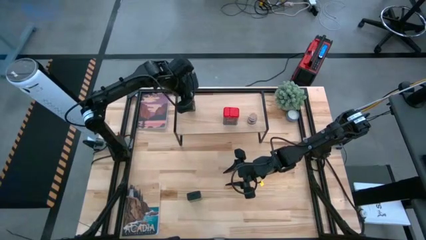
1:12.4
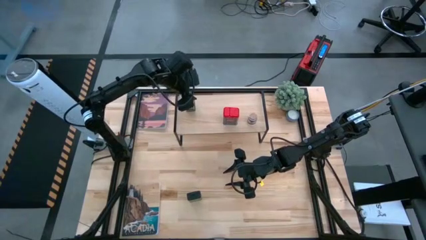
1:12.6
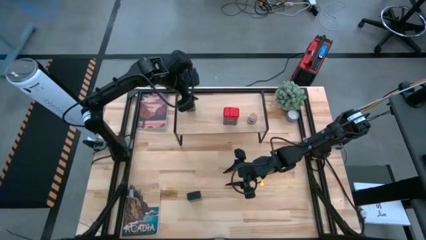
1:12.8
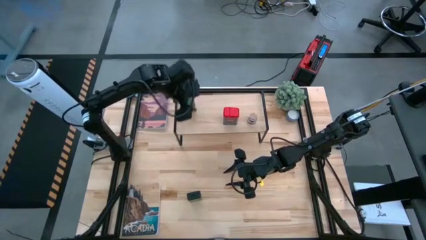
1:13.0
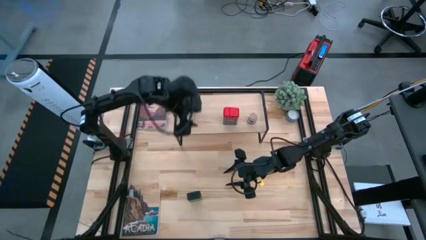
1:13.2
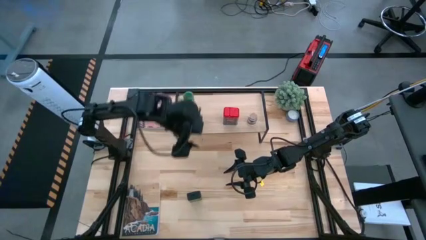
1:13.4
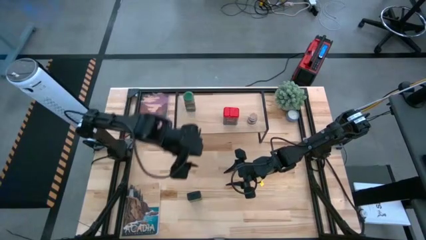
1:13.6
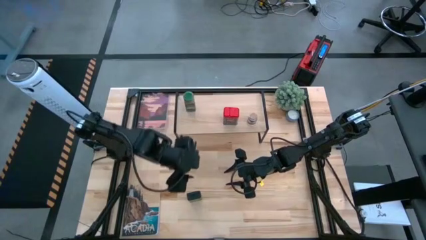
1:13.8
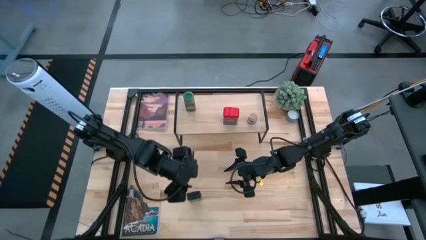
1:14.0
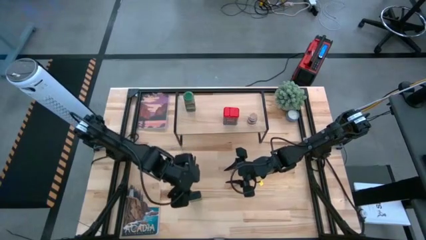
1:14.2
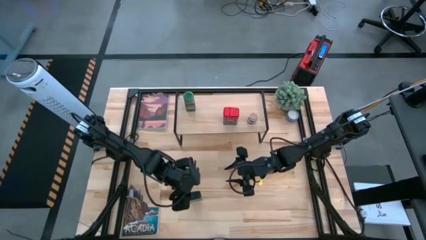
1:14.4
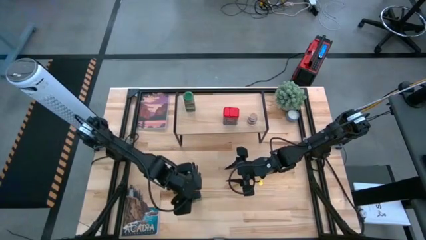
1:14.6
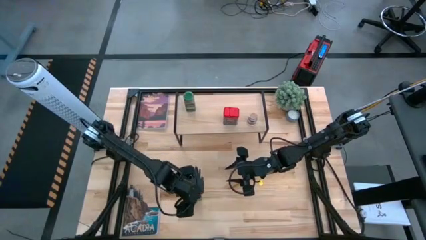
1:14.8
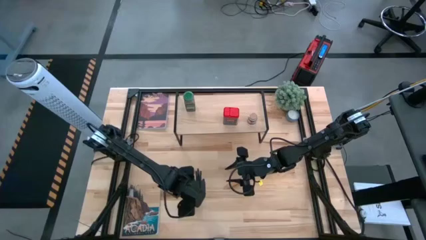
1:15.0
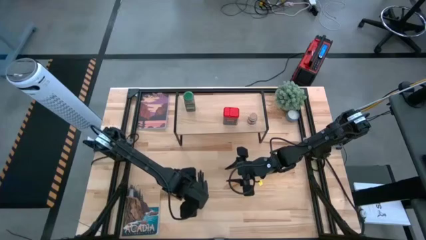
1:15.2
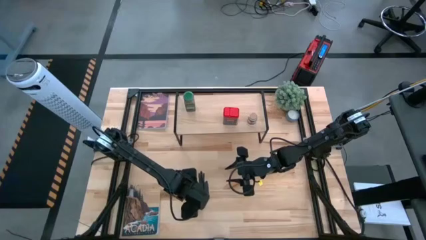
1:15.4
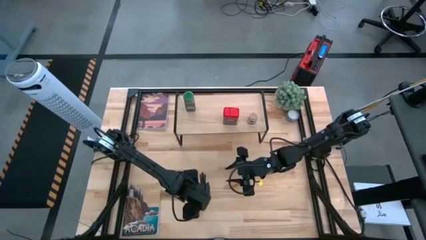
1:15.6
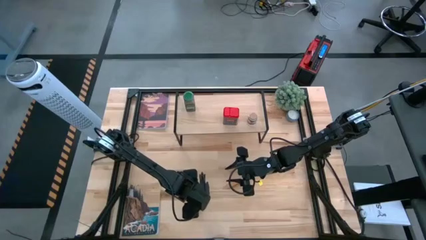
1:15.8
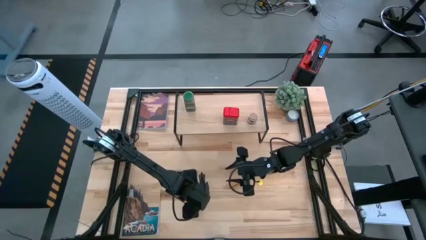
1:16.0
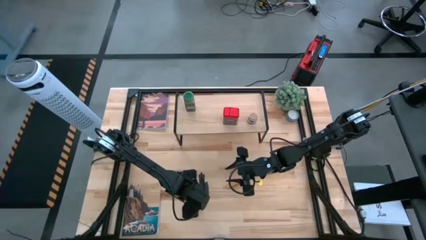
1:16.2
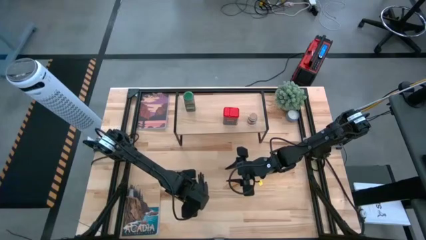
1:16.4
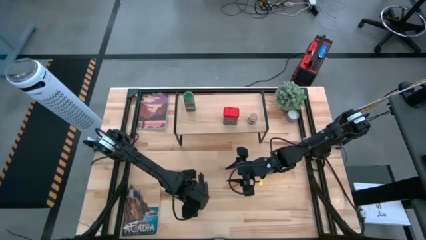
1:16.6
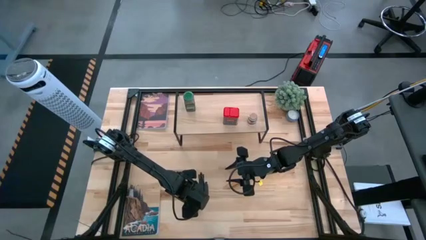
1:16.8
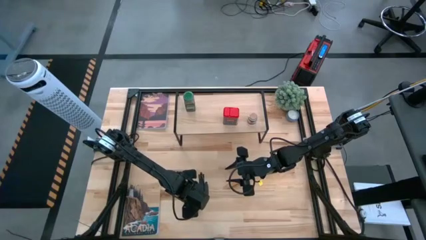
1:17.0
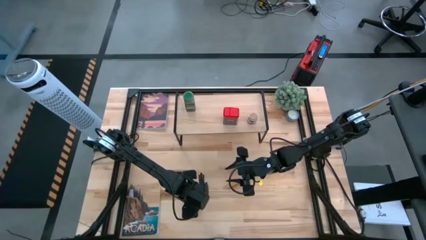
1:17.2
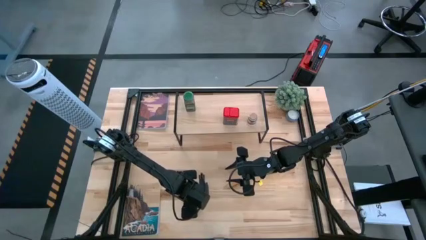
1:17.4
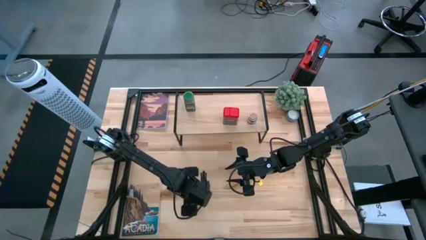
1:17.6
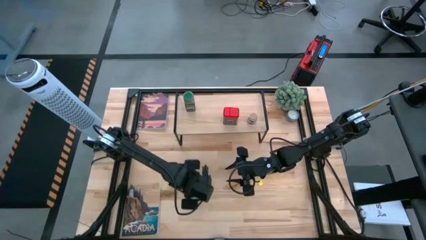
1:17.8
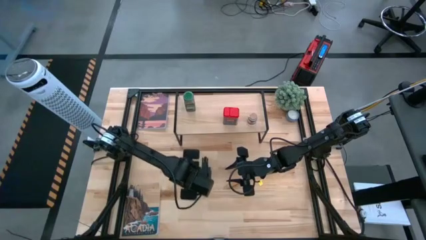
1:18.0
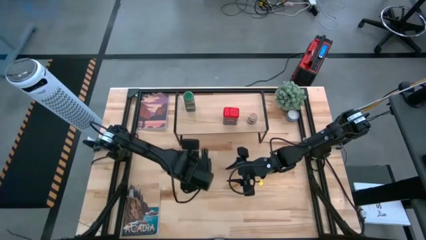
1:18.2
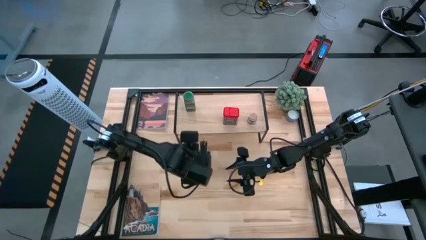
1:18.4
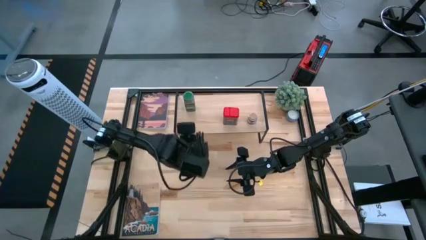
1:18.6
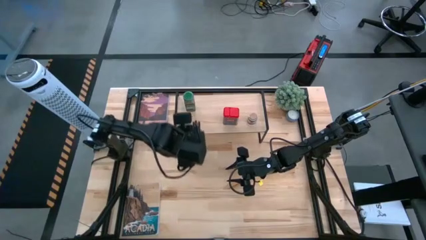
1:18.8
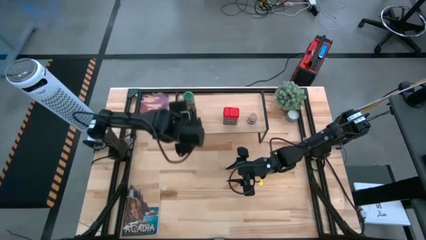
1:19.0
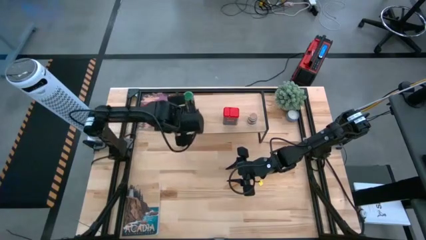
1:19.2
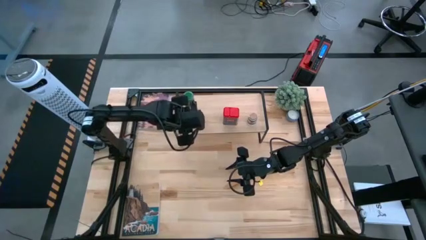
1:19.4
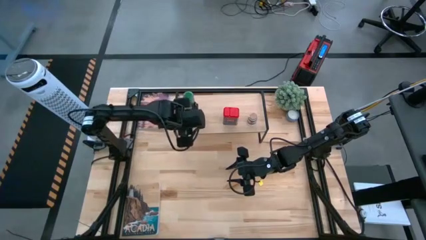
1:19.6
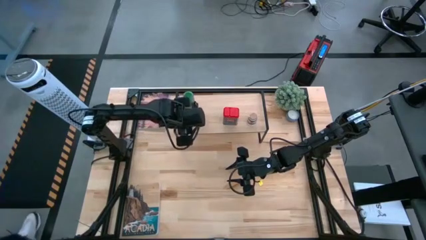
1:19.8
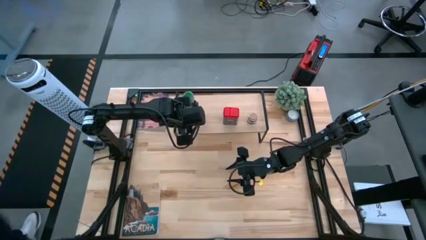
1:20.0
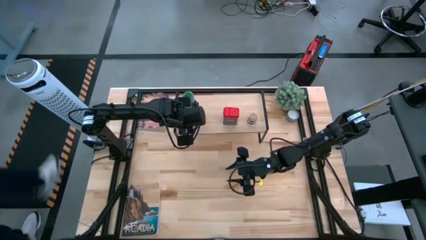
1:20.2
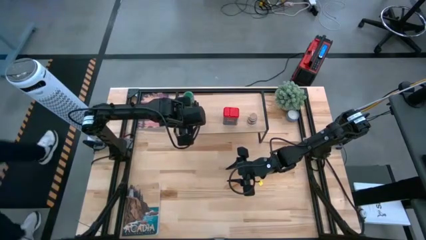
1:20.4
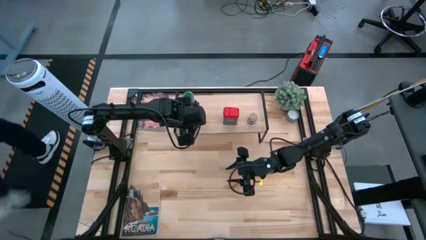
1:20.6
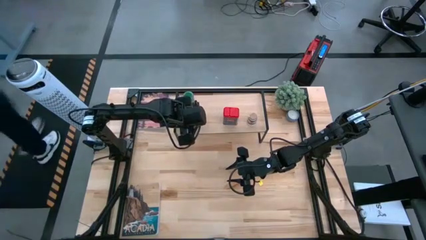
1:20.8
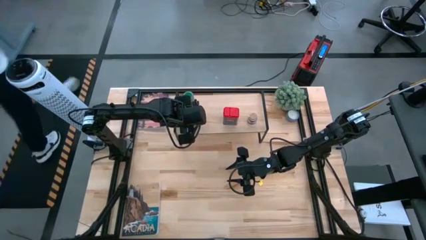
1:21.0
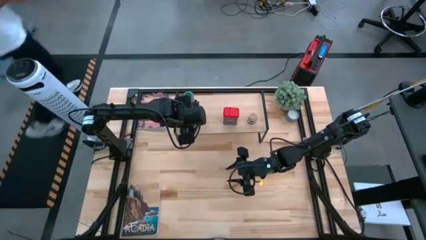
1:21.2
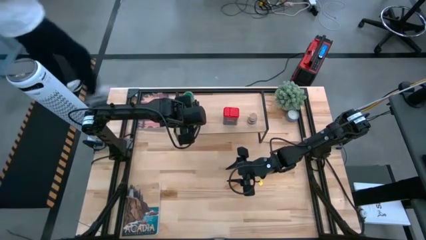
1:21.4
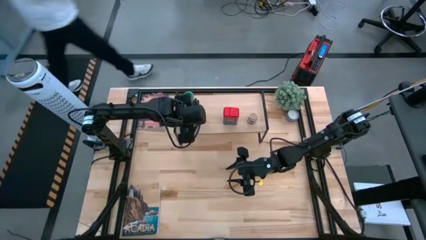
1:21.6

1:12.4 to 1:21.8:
Task: Shelf spices
Put the green seasoning can on the shelf

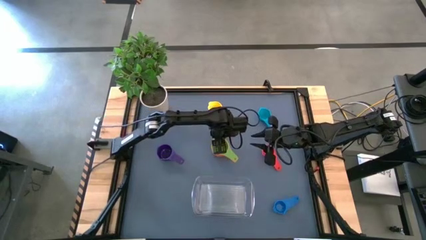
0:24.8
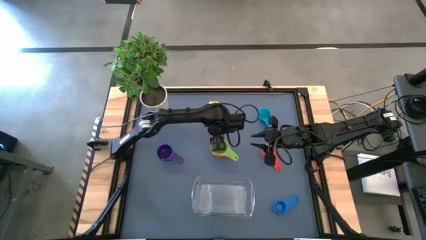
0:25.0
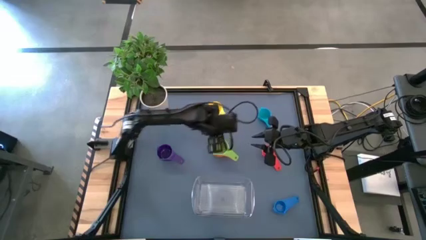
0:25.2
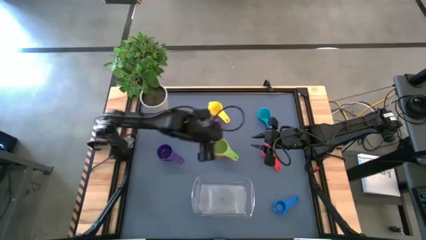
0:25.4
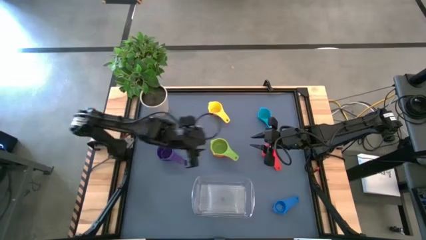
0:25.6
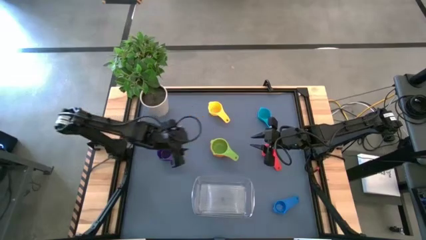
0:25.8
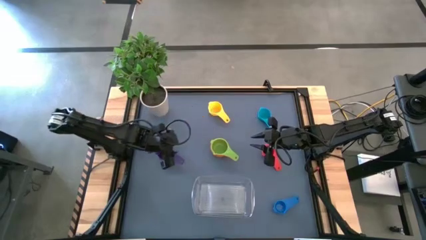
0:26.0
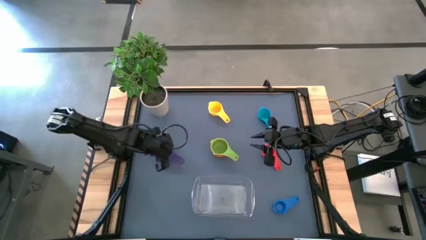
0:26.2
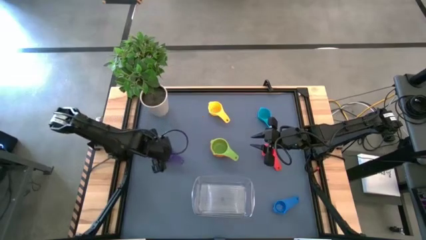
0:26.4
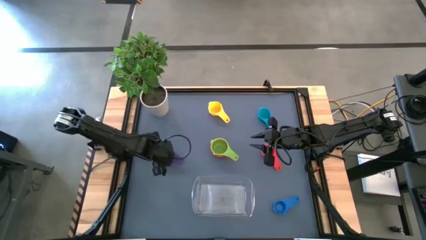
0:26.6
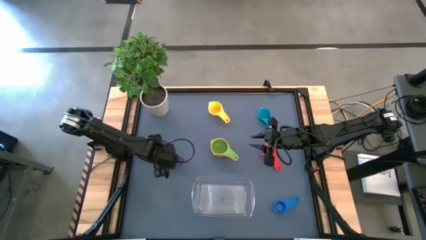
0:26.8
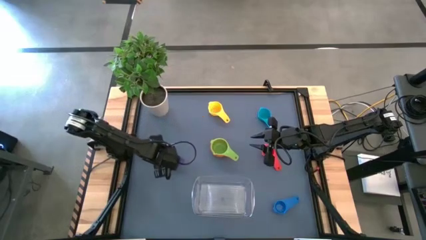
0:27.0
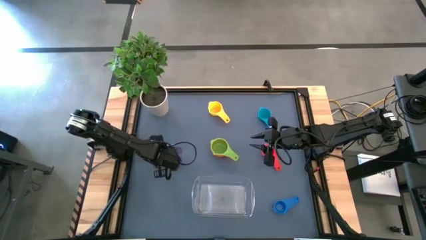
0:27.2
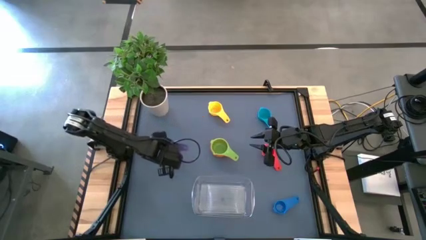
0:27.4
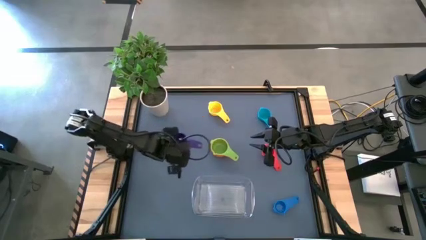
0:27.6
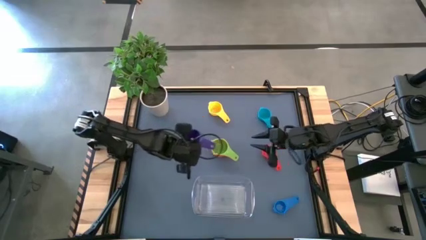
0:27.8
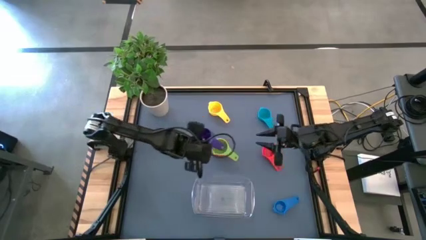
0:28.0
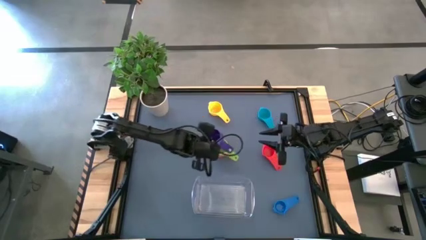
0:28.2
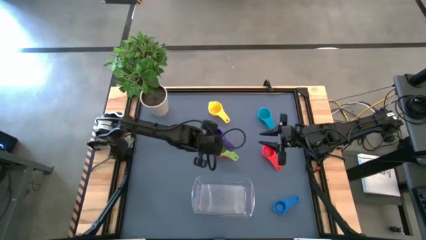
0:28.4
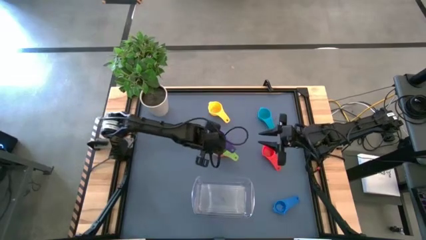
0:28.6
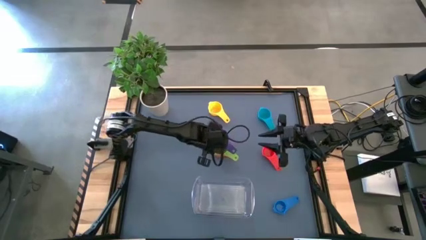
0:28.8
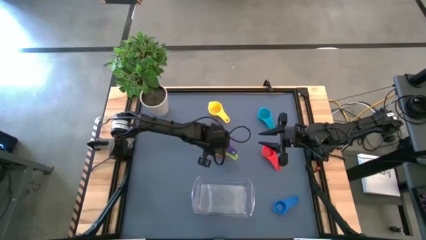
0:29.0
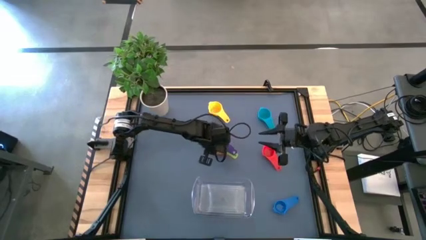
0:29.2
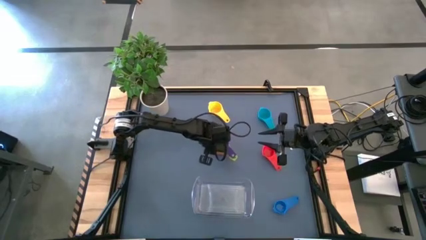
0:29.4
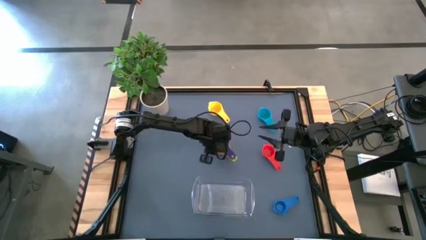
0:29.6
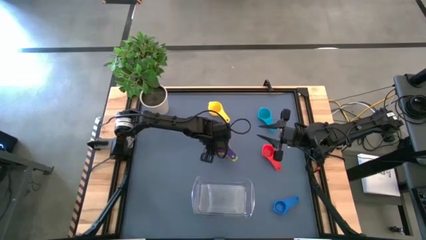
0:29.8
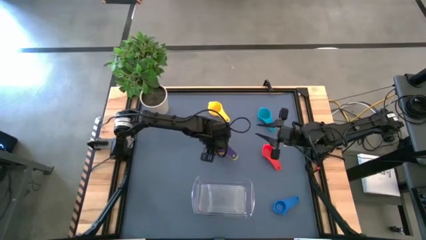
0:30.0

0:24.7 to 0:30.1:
Task: Nest measuring cups in basket
Stack the purple measuring cup on top of the green measuring cup
